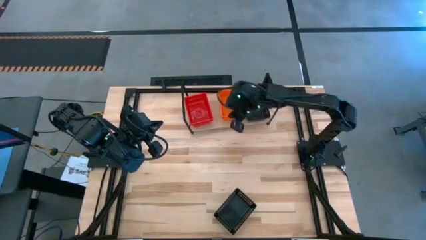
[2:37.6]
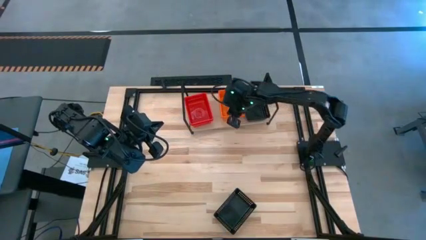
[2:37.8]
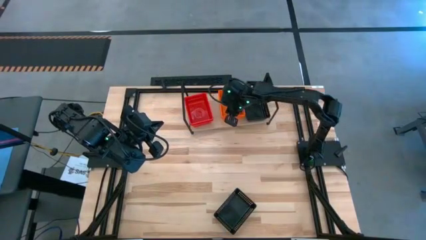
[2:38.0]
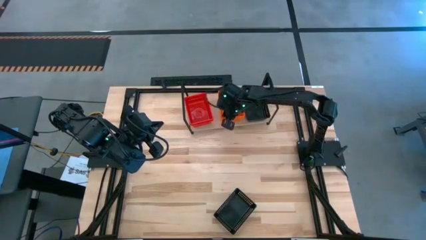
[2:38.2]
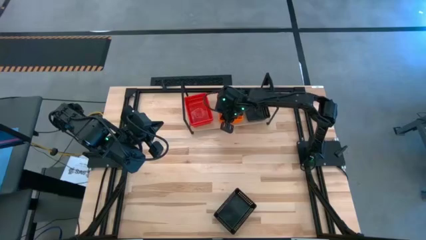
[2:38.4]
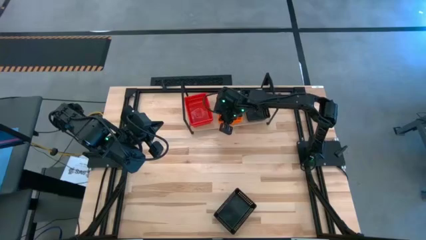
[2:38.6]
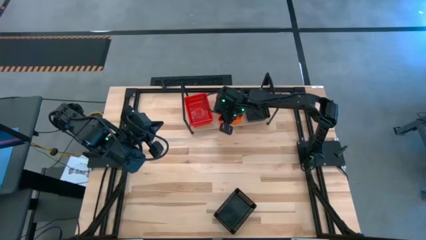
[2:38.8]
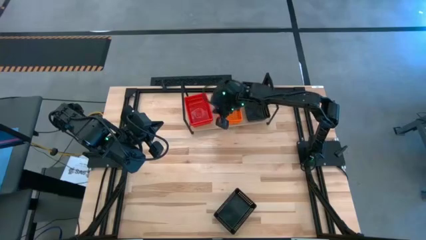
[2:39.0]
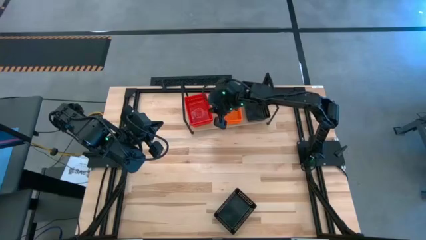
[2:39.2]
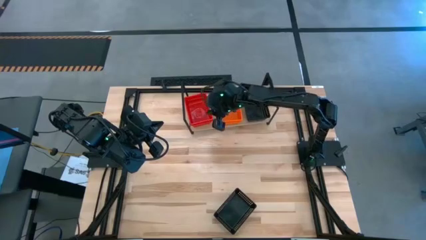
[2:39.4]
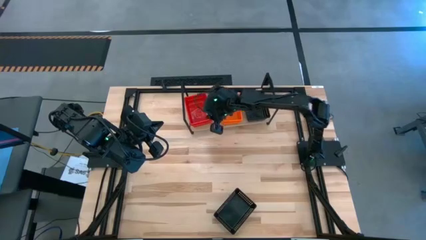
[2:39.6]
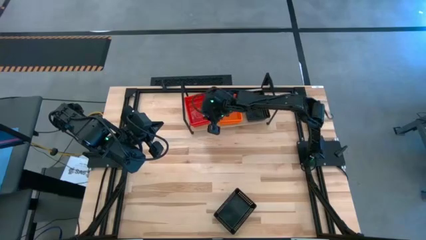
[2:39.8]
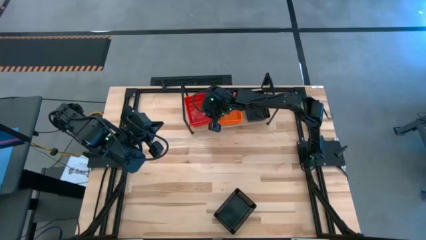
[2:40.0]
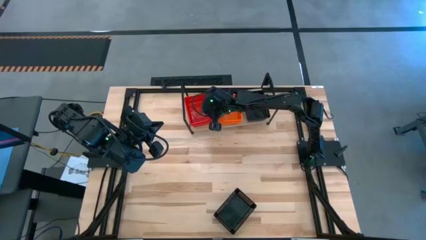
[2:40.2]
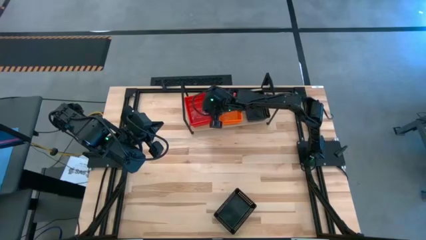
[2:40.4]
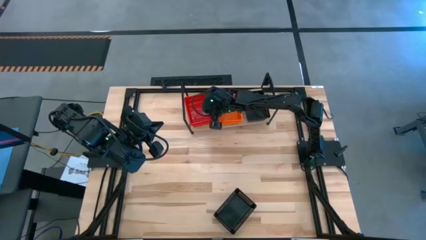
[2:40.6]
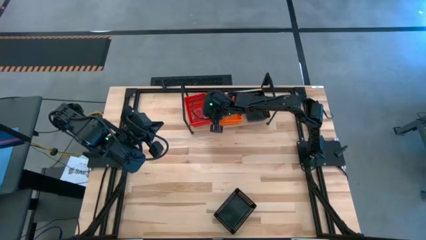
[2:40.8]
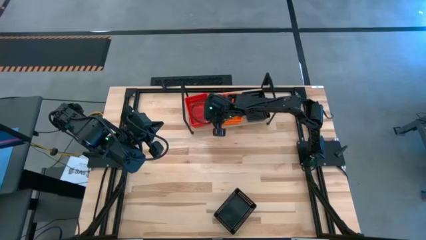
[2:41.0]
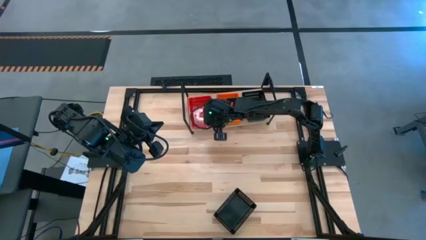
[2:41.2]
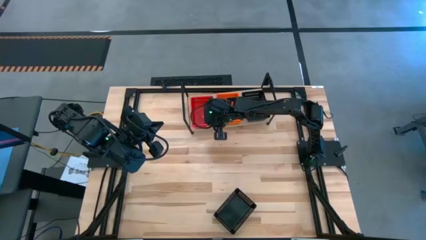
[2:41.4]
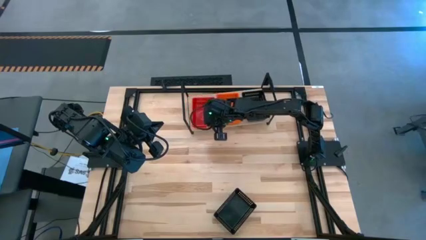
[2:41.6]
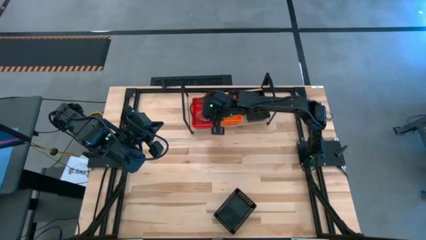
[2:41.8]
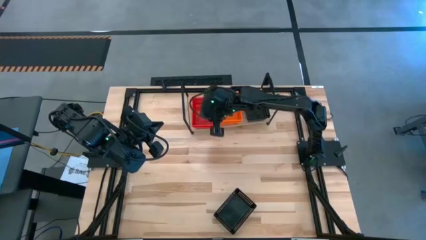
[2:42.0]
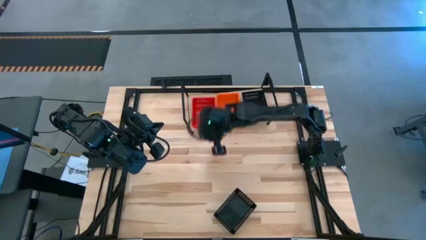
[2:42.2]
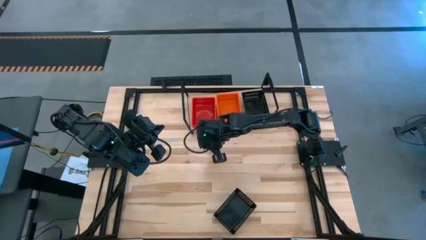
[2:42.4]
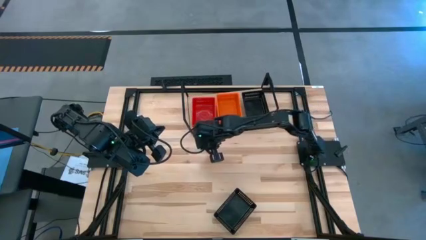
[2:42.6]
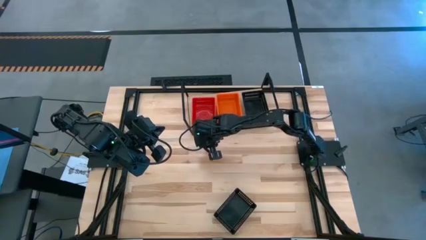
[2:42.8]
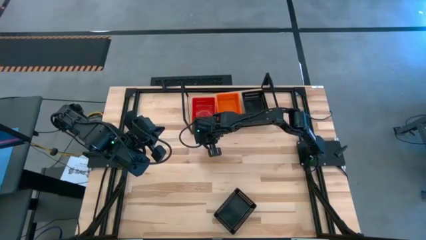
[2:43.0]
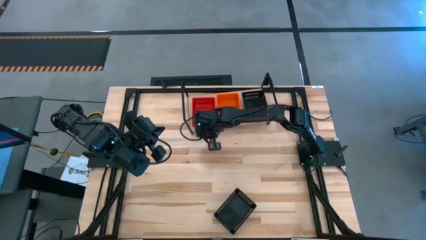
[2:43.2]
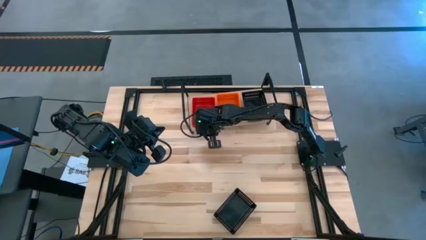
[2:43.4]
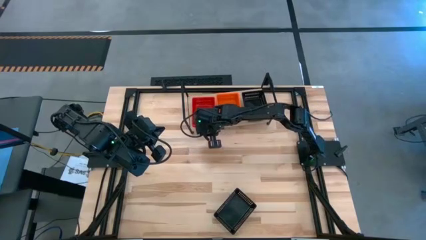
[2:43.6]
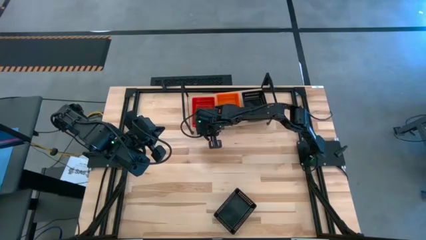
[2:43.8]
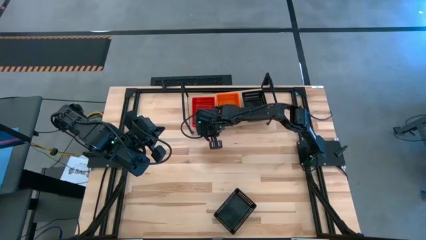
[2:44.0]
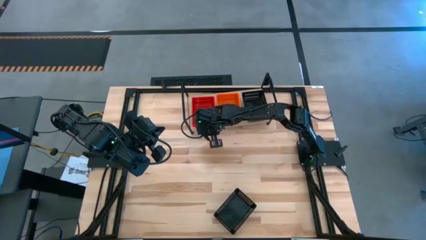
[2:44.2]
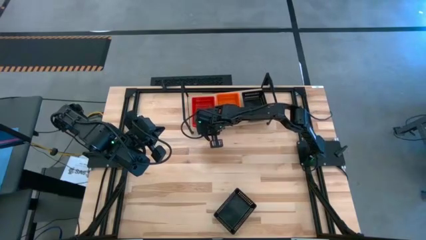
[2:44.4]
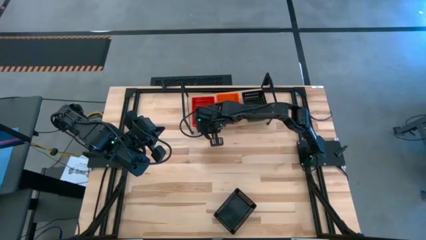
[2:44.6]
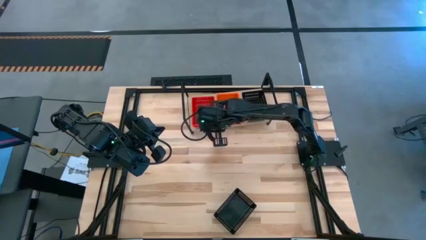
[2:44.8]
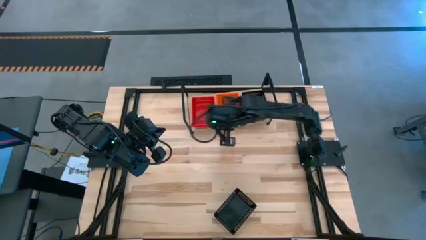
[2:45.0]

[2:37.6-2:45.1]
Task: Stack baskets on shelf by color
Adjust the stacked bins on the shelf

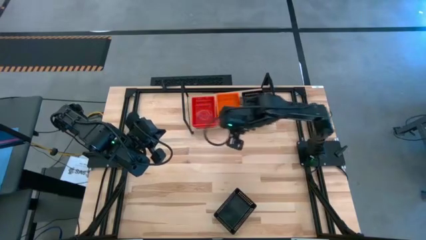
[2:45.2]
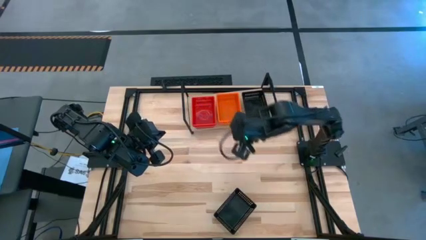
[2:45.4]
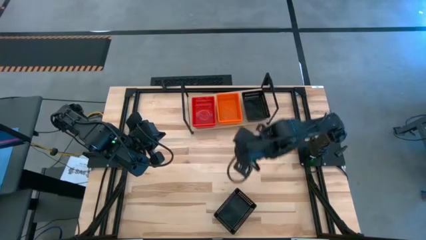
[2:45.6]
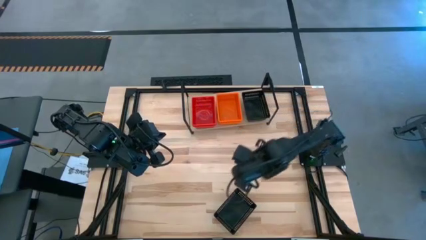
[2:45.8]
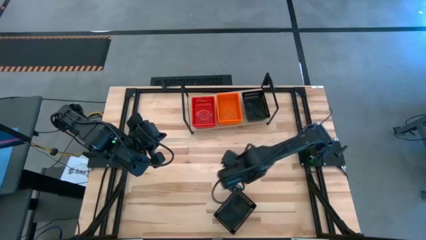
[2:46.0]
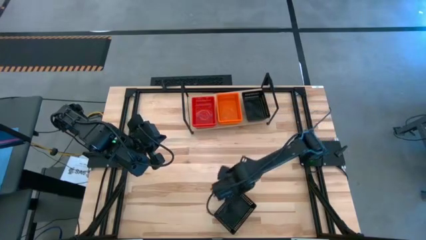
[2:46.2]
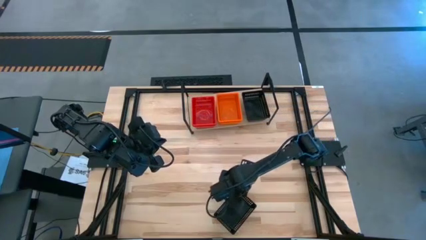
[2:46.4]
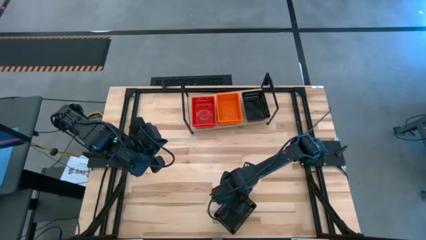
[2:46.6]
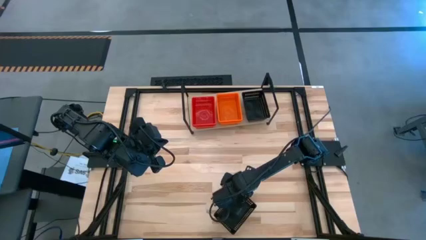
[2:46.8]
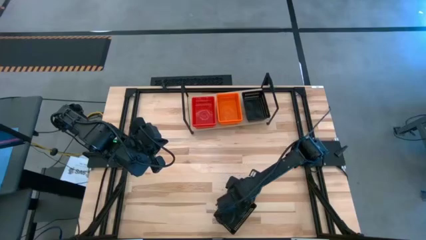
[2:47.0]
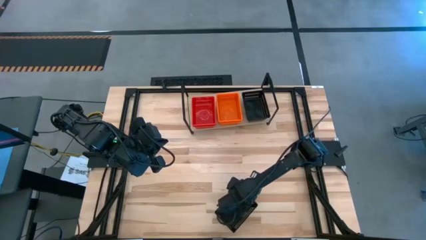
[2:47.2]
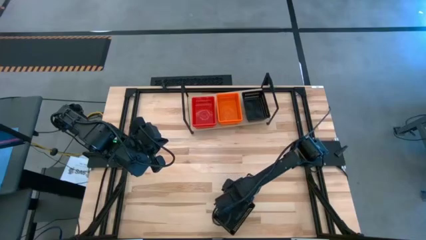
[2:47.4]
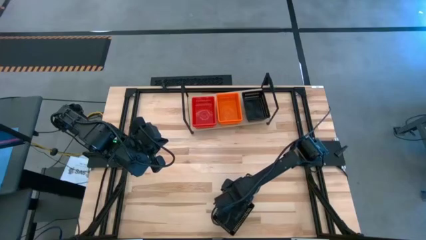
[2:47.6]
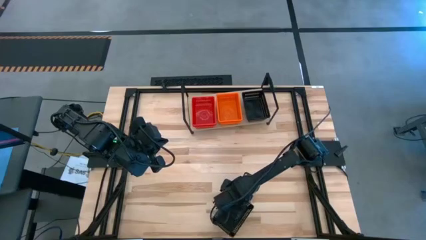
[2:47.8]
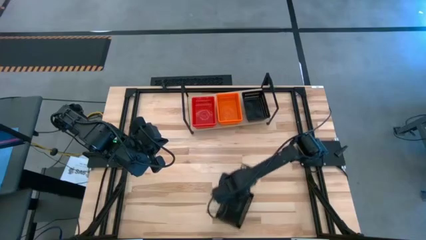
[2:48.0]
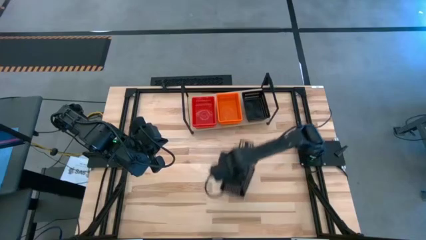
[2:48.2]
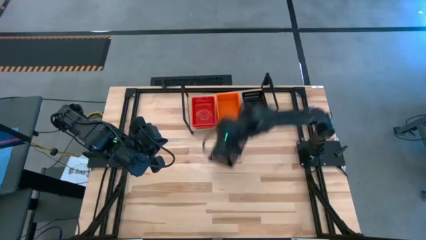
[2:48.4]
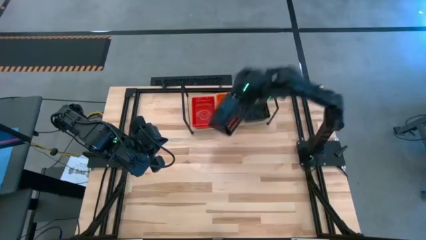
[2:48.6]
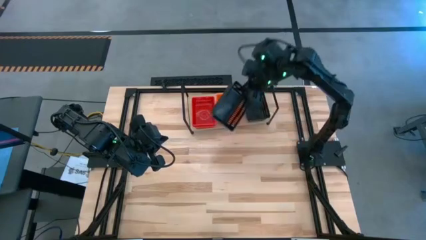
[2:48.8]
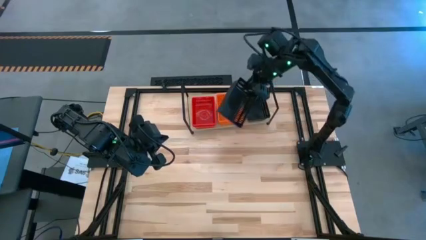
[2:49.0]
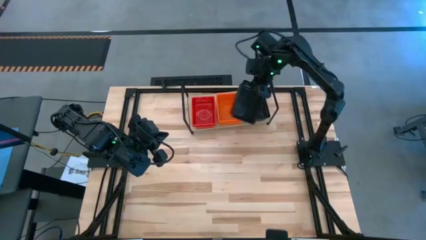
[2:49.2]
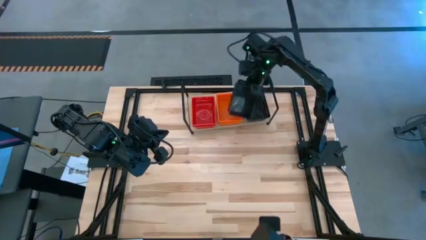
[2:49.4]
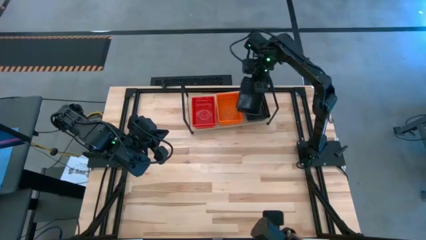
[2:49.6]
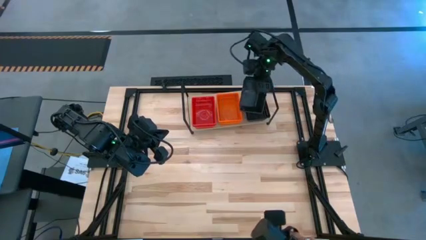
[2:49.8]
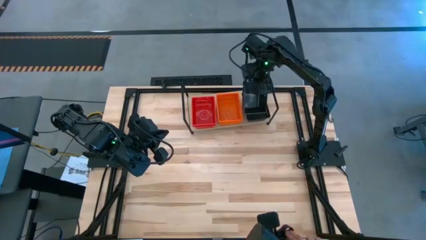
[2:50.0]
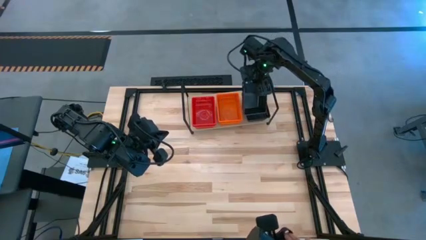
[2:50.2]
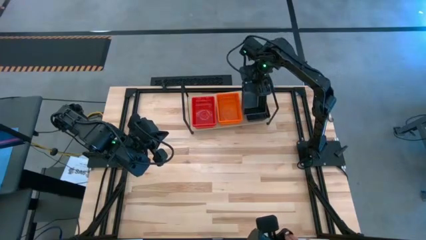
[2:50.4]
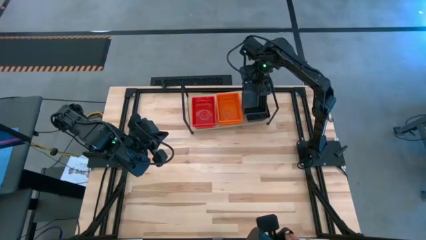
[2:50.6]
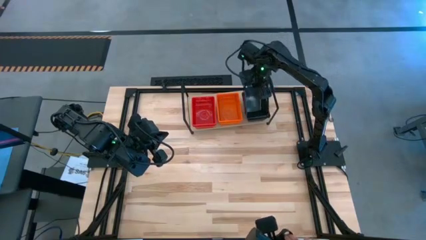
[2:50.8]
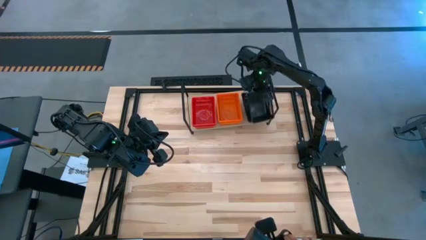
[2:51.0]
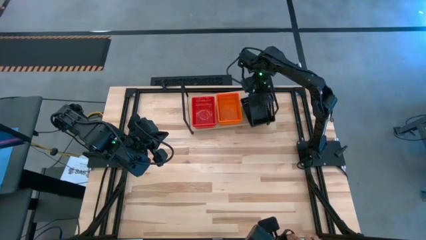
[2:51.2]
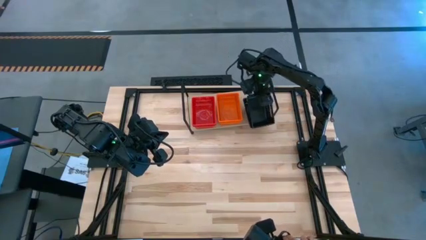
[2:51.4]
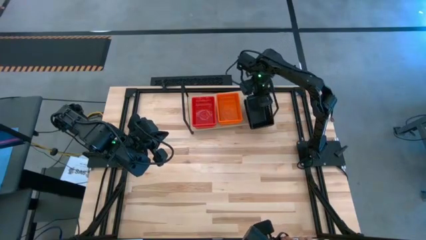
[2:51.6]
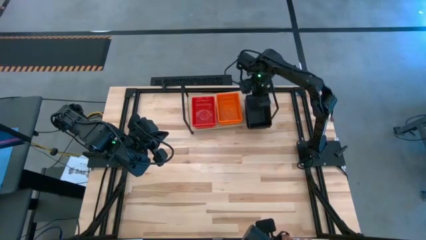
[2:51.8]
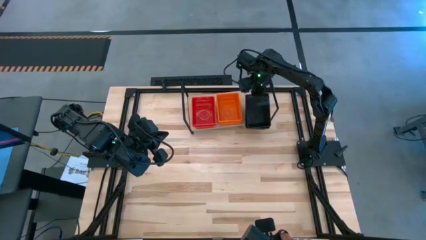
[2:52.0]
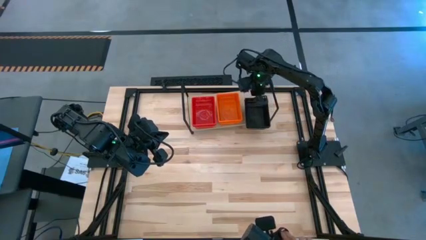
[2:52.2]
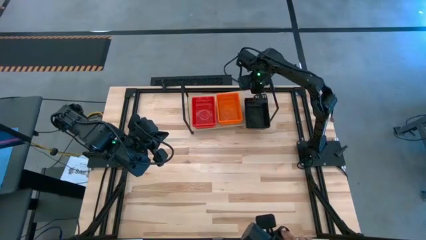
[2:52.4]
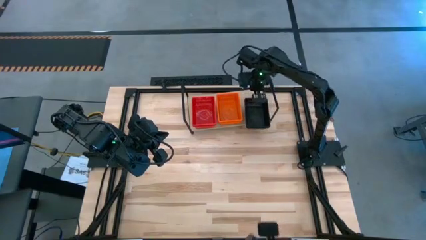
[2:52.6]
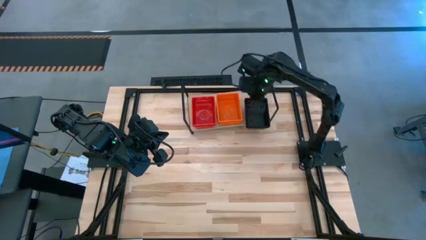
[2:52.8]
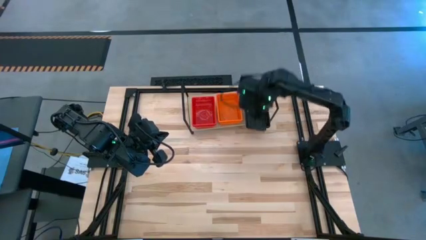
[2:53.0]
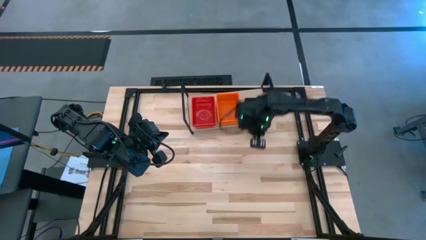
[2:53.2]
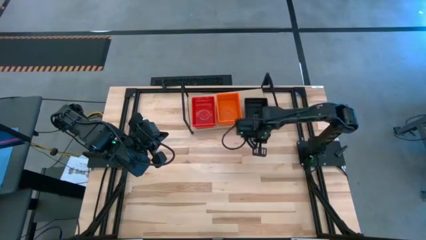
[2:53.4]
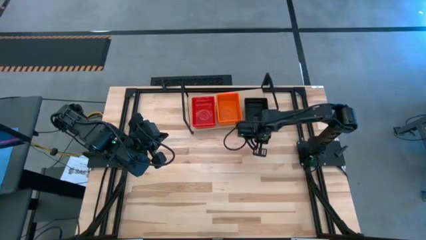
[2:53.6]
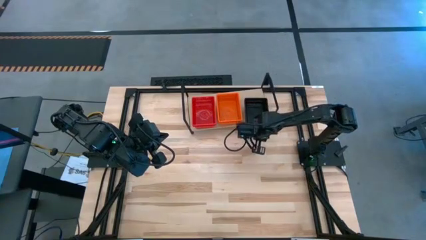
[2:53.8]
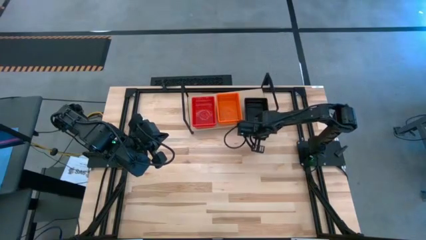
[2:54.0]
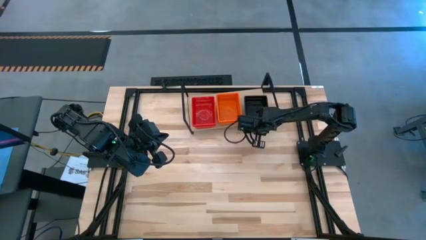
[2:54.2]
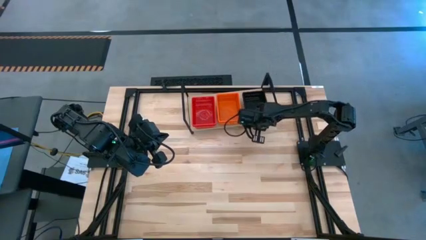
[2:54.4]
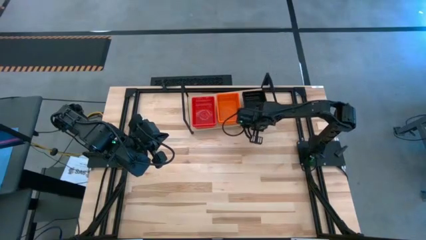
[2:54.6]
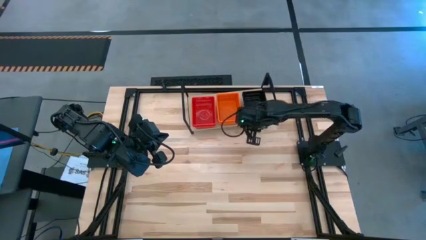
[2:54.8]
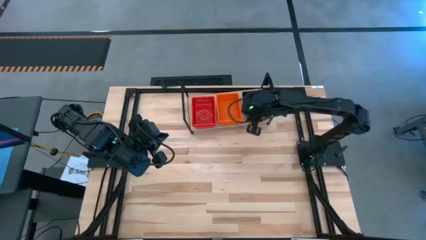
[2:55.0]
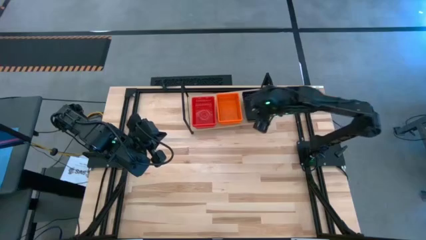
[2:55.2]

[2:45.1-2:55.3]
Stack the black bin into the black bin on the shelf
